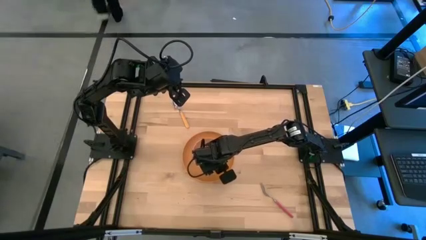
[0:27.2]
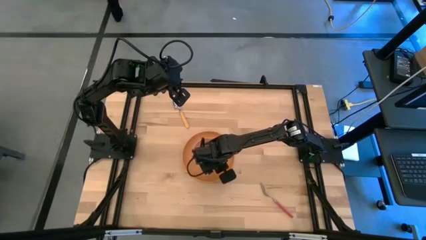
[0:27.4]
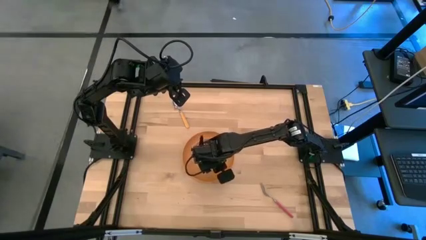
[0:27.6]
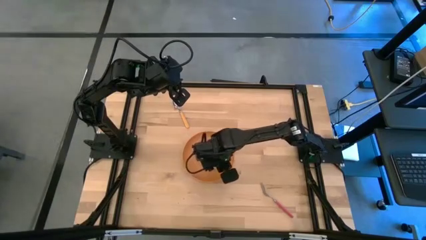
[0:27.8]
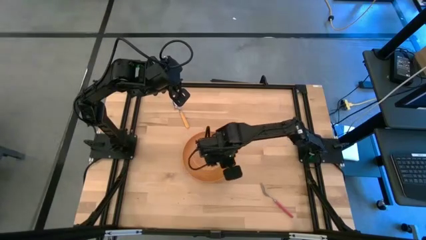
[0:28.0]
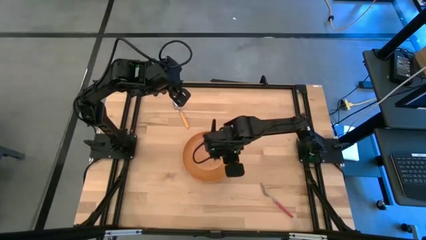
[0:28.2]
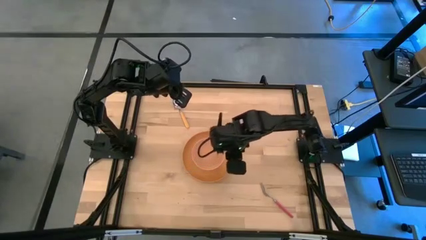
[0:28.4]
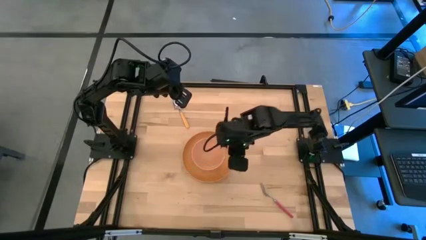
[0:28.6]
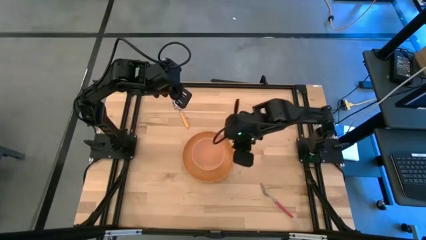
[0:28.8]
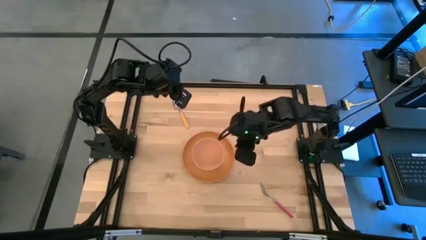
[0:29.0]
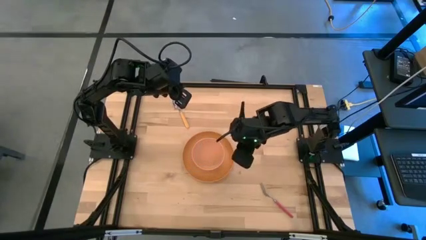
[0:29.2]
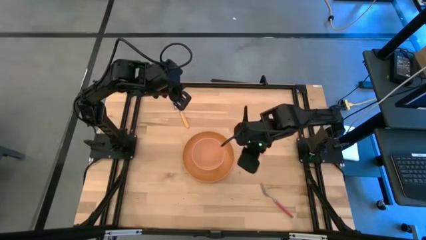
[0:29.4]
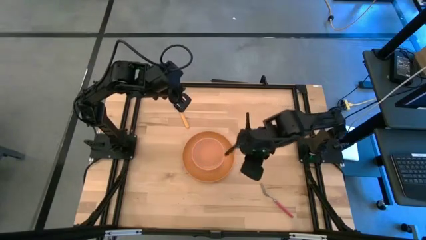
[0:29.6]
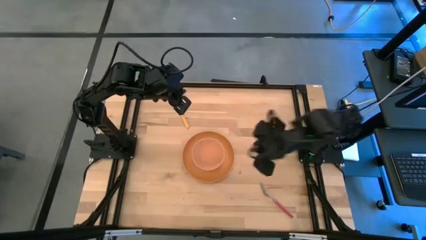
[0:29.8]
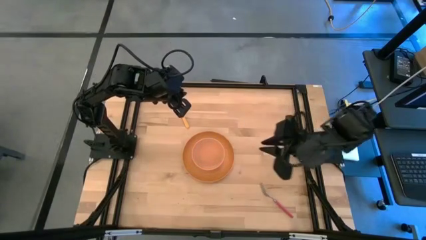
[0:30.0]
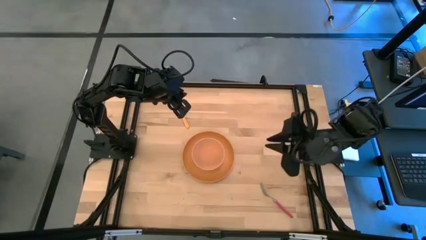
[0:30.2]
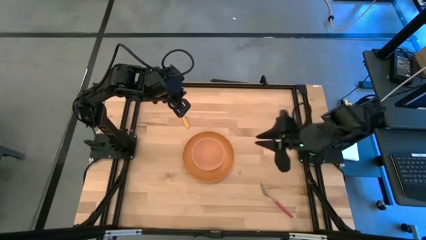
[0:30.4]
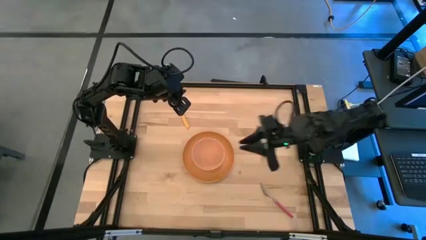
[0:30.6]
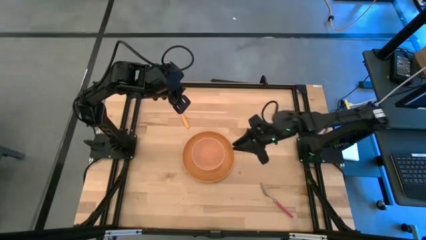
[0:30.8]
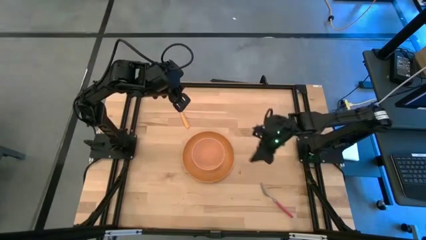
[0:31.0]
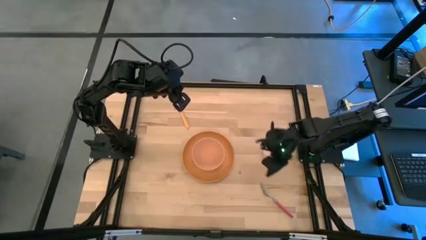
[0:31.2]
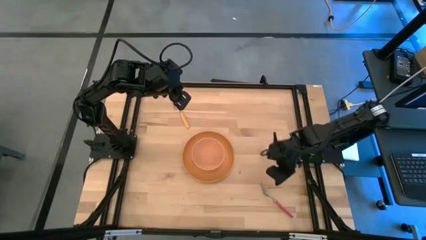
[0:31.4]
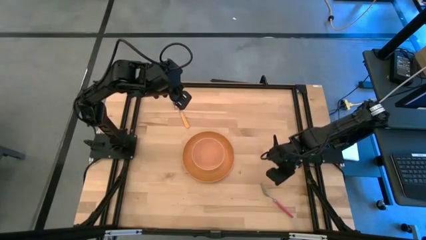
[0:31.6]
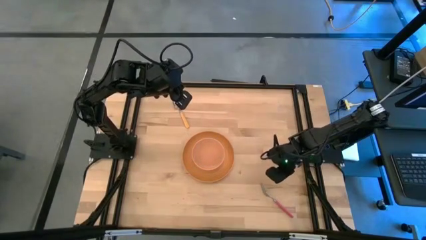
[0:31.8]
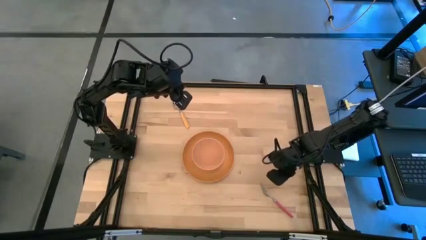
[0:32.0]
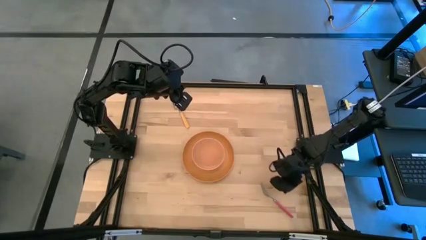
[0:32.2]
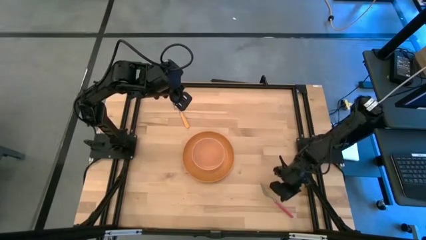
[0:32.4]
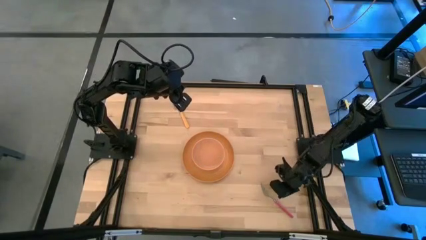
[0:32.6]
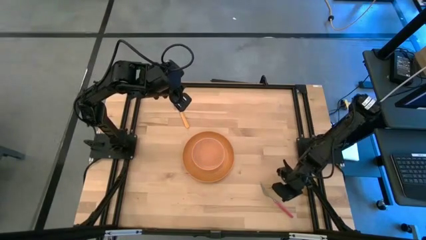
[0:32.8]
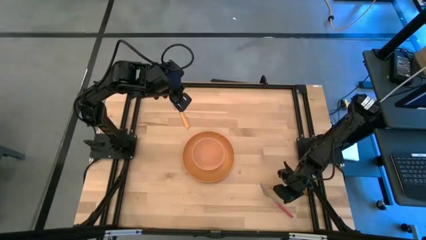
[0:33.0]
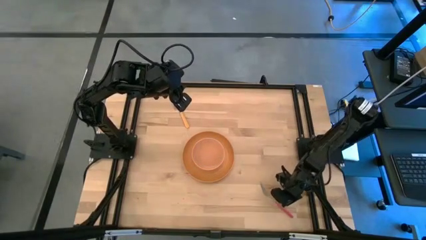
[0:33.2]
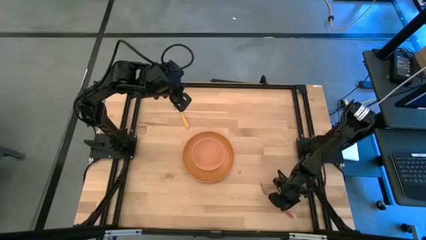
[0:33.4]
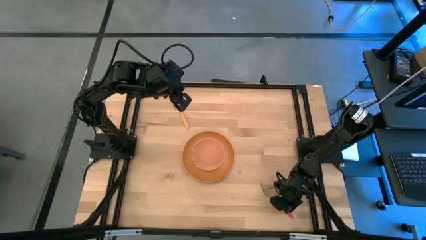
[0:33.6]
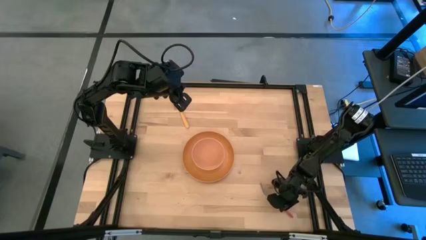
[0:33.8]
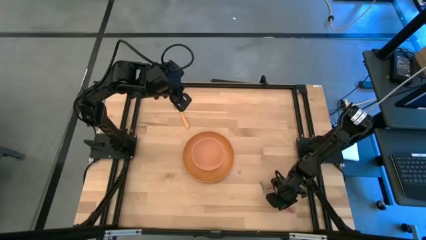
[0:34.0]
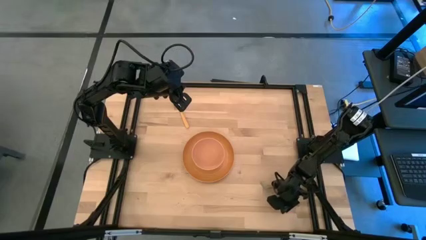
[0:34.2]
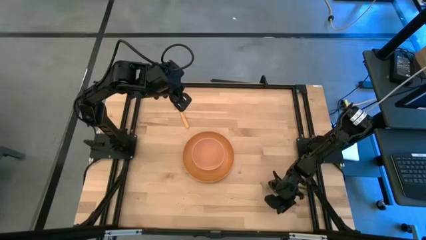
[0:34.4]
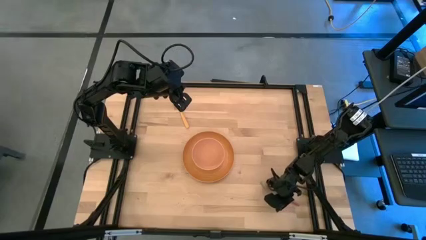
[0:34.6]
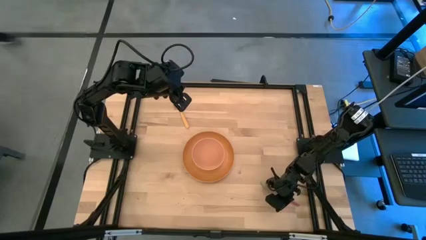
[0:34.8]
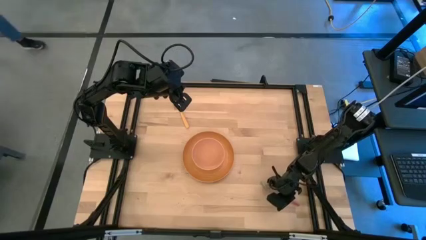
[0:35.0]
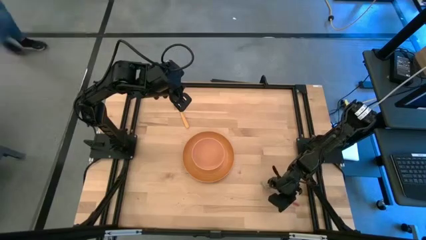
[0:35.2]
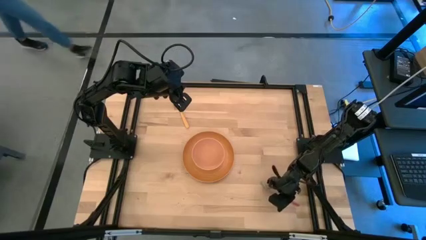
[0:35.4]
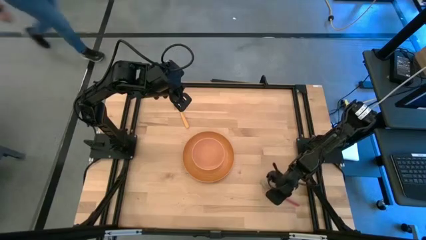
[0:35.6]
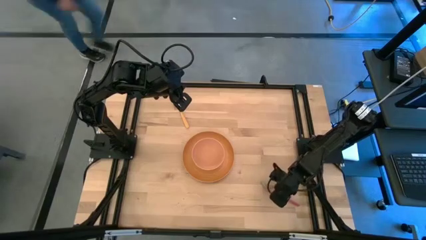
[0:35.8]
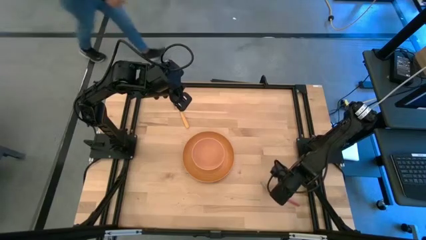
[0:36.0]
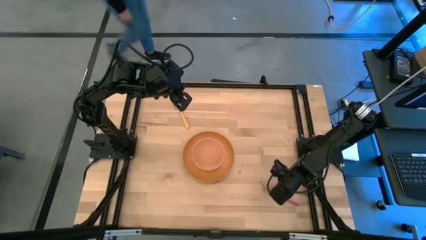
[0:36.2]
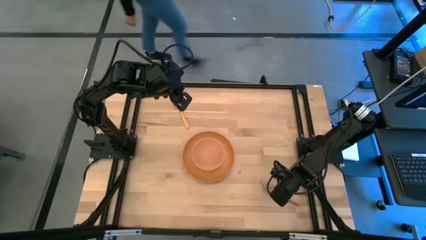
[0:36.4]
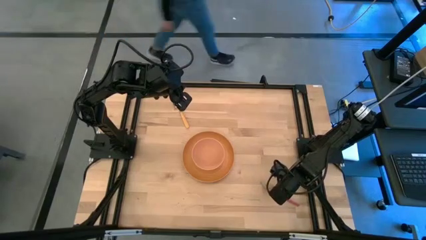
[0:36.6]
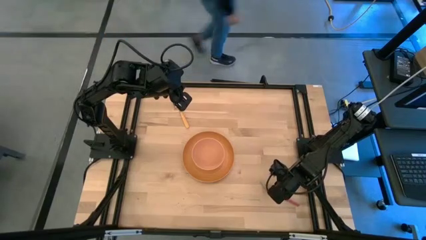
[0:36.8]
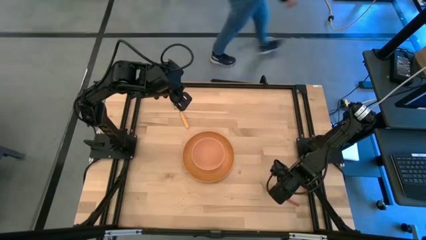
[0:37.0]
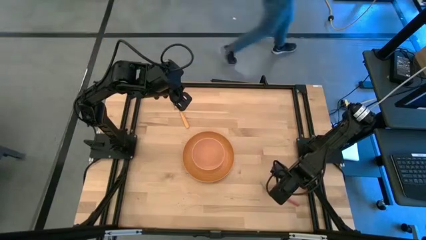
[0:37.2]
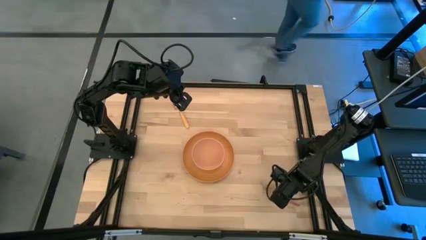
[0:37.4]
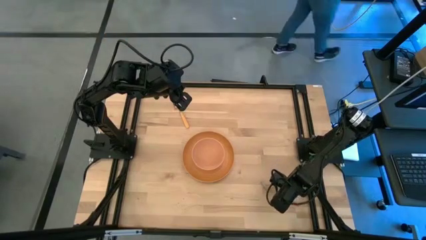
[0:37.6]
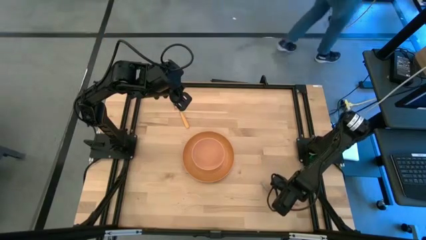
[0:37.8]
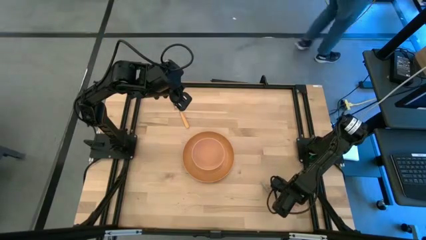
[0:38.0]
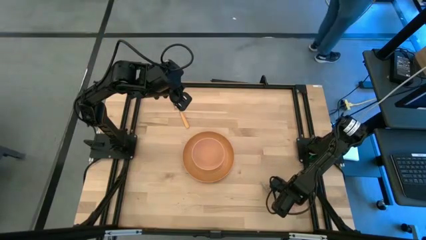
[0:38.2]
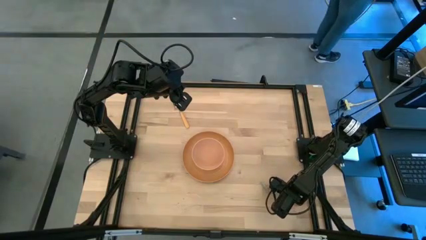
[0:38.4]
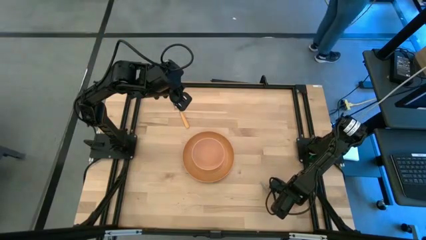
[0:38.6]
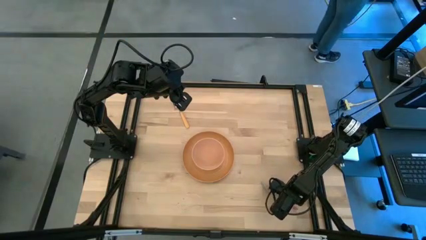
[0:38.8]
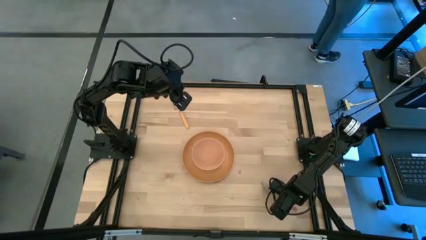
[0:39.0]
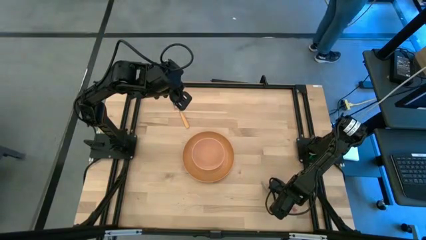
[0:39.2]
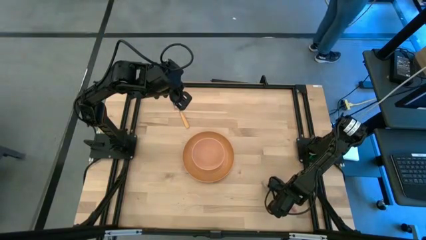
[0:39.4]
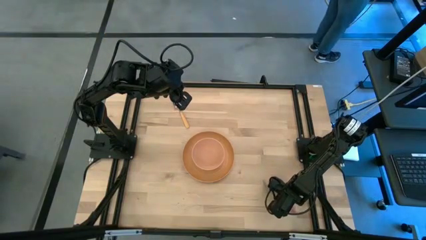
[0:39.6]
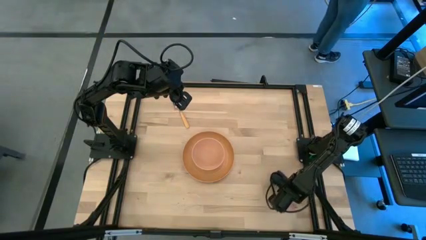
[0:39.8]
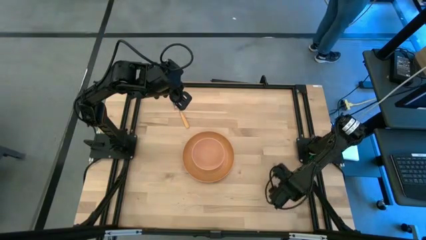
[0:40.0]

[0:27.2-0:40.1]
Task: Set table place
Put the pink fork to the right of the orange plate

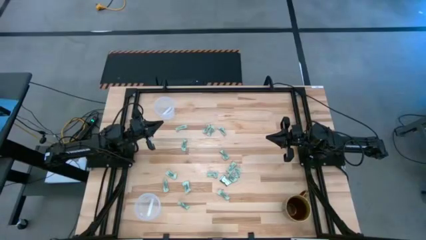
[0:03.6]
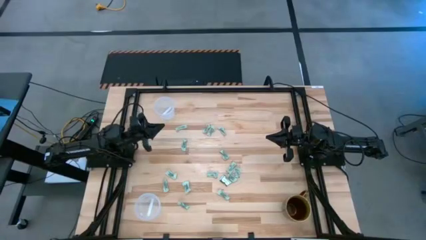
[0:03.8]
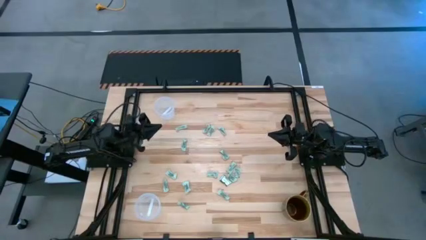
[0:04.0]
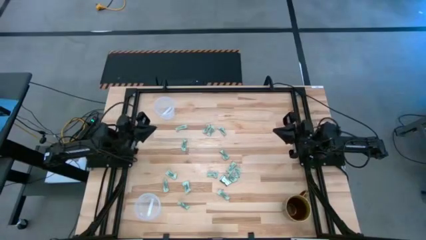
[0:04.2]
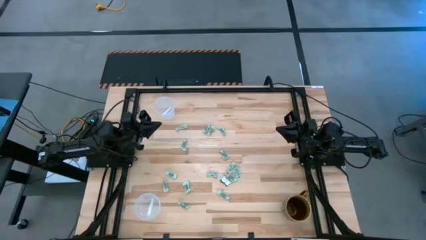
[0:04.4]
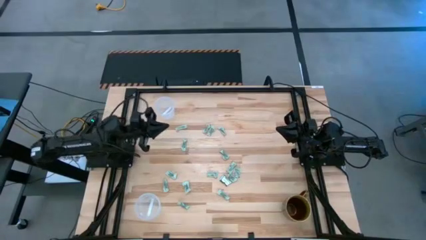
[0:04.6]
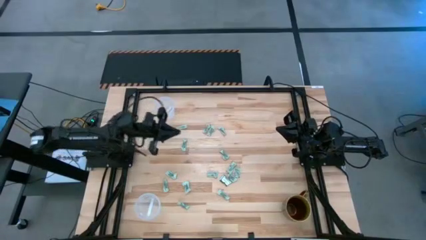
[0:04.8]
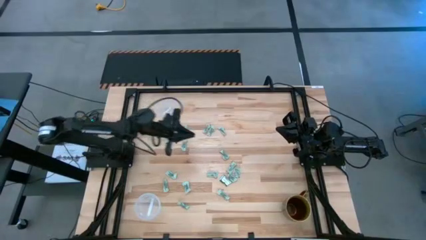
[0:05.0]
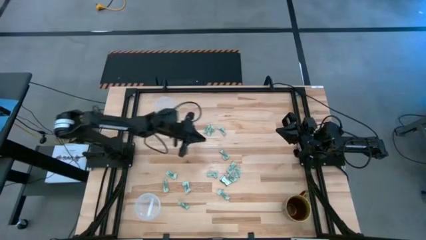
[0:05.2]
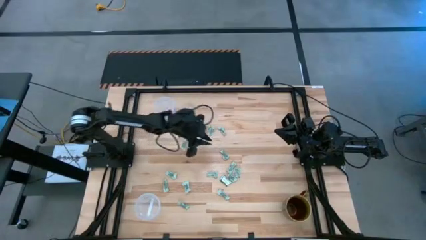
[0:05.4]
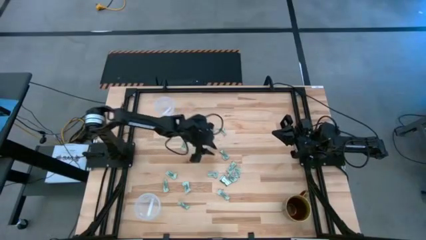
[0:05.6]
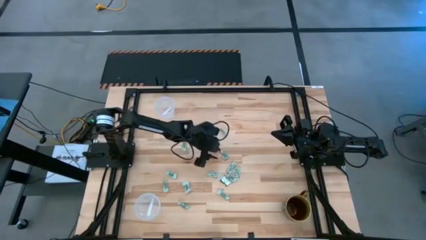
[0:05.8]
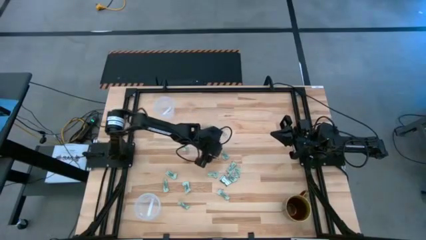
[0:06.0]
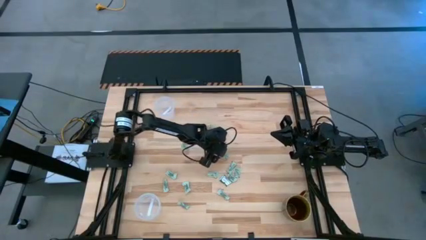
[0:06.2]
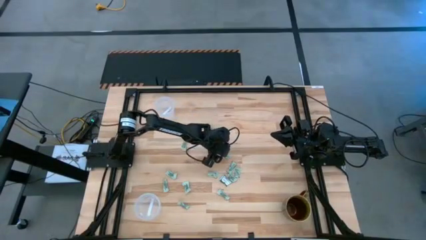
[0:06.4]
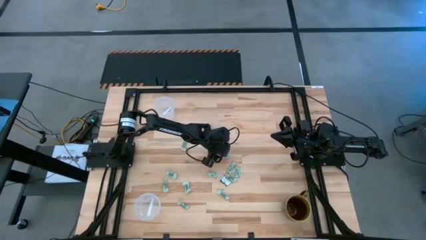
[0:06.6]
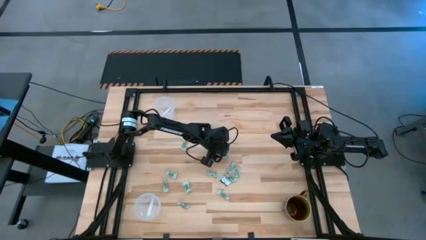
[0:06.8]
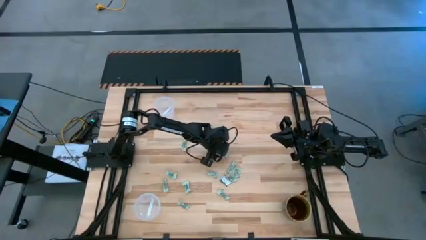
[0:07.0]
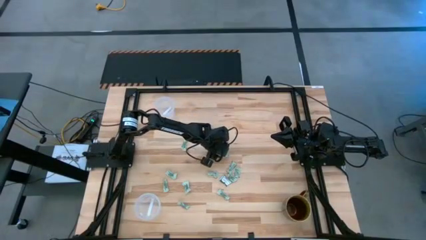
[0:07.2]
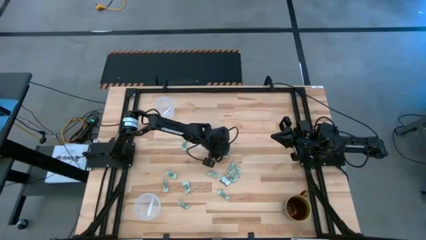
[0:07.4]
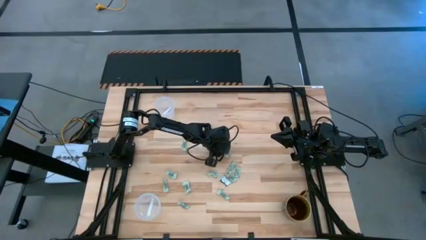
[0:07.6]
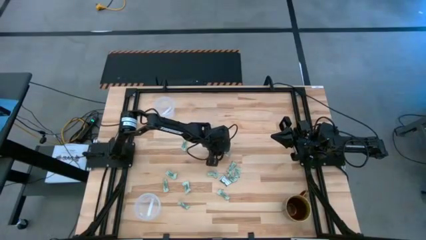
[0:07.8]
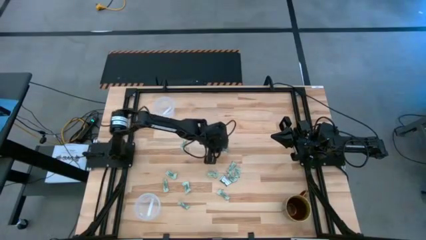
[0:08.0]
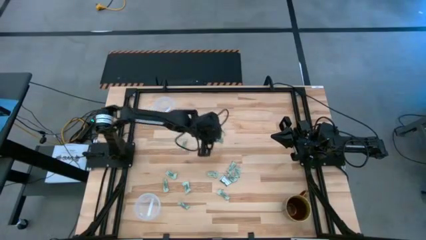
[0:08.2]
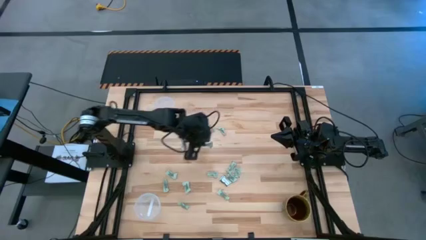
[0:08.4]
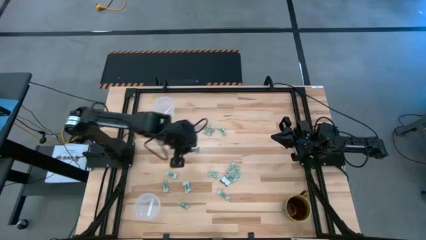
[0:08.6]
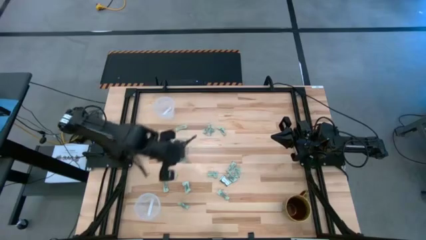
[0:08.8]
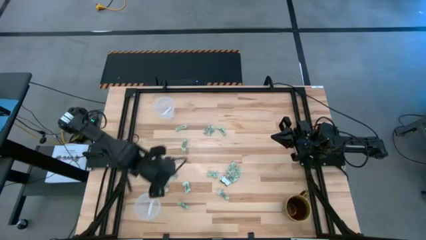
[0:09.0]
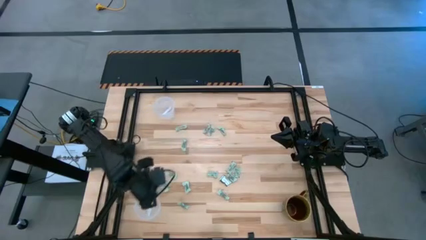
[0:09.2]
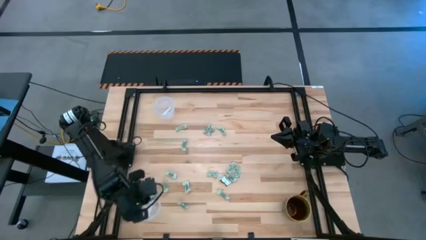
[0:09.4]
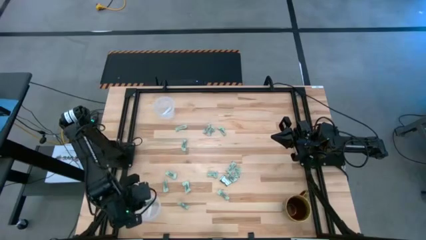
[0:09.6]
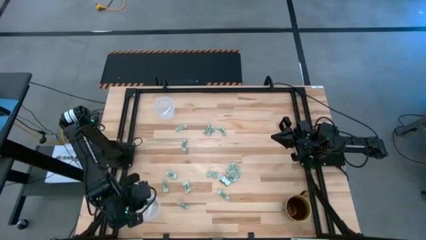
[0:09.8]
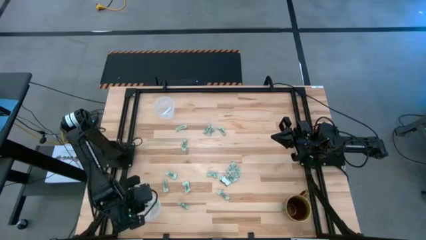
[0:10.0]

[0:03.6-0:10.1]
Task: Pick and place Stevia / Truvia into bins
Put the stevia packet into the bottom transparent container
